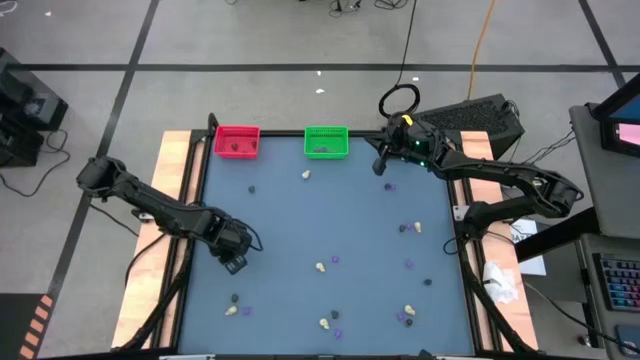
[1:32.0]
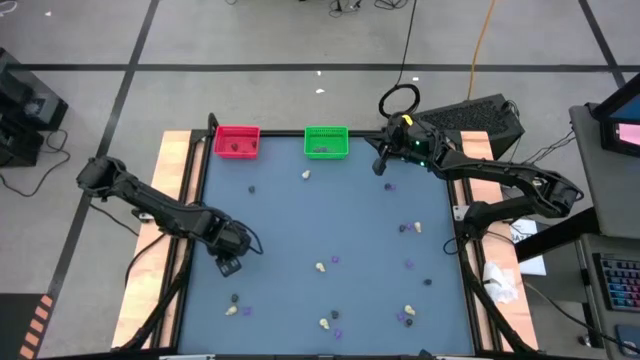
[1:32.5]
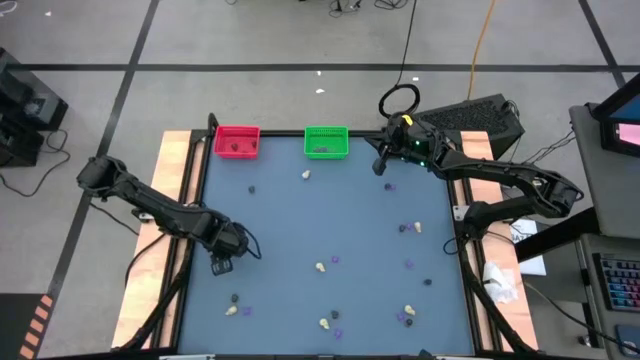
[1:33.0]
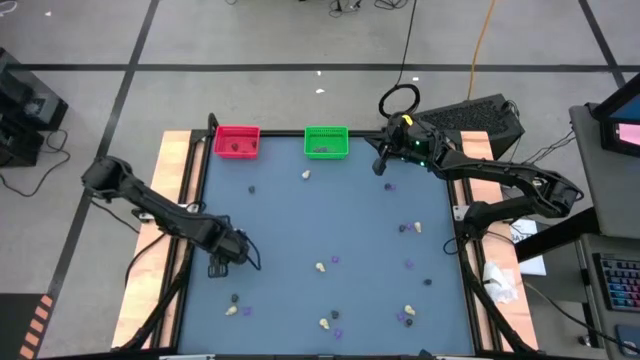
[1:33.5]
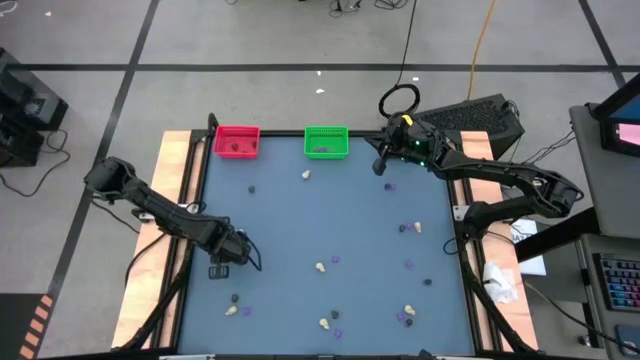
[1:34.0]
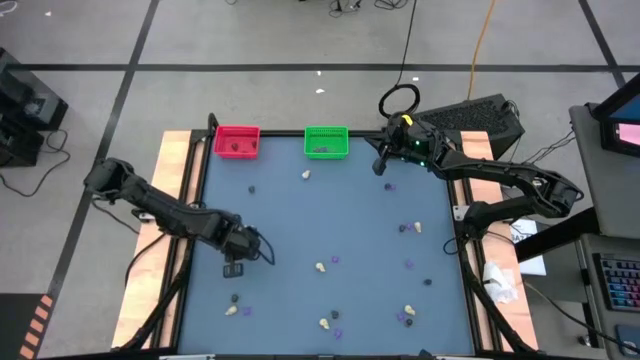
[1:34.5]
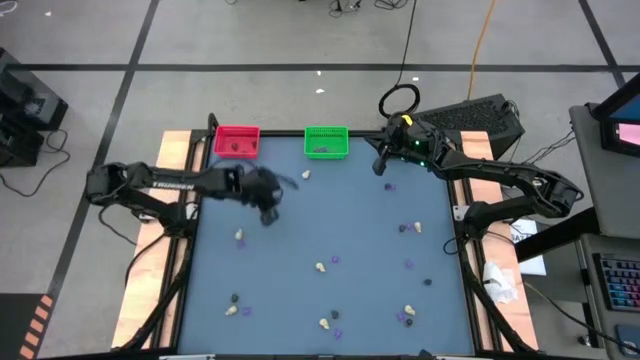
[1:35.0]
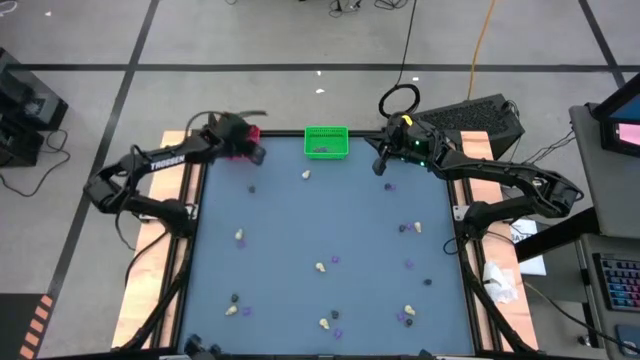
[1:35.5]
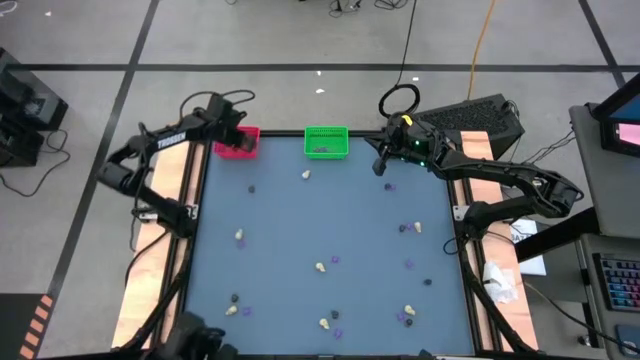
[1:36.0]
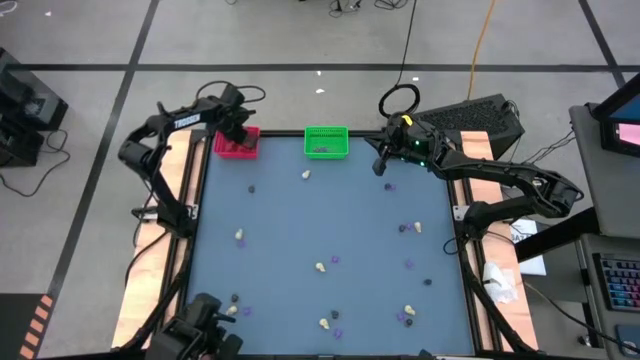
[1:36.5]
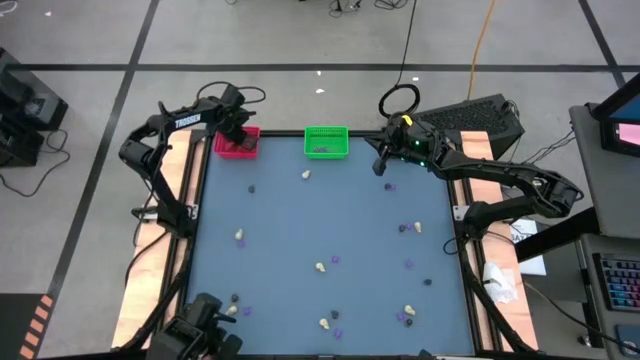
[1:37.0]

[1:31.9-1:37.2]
Task: Sort Halloween decoration
Put the black skull toy into the red bin

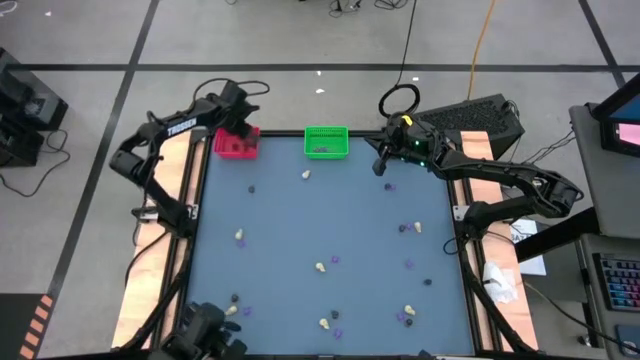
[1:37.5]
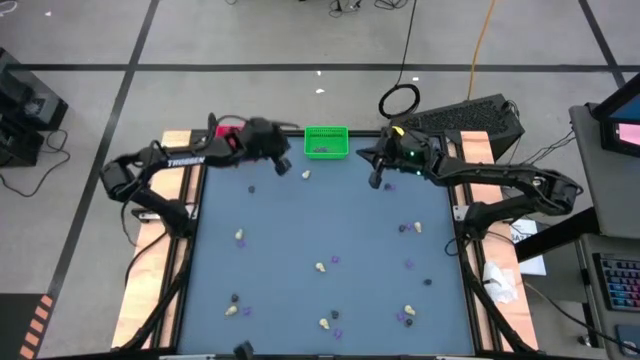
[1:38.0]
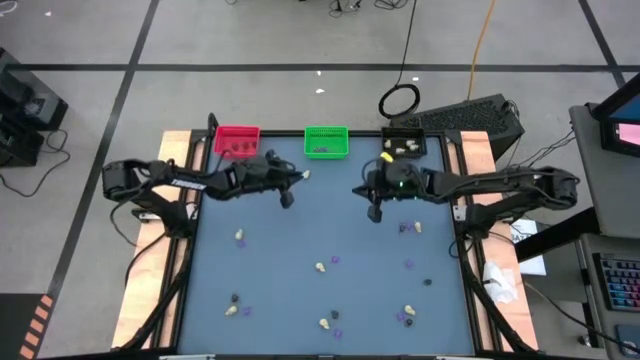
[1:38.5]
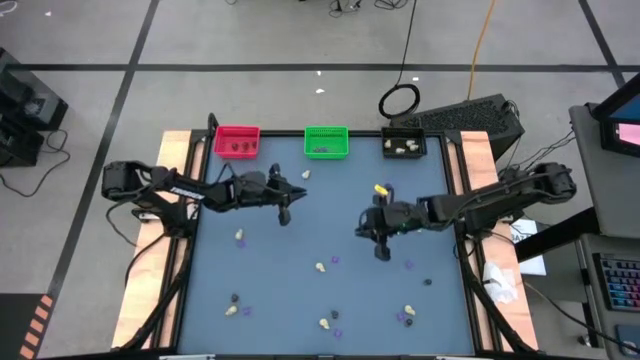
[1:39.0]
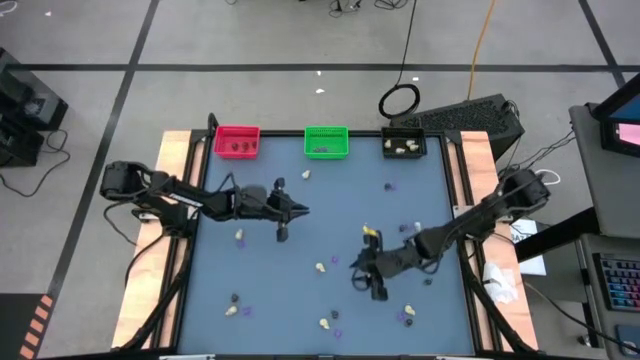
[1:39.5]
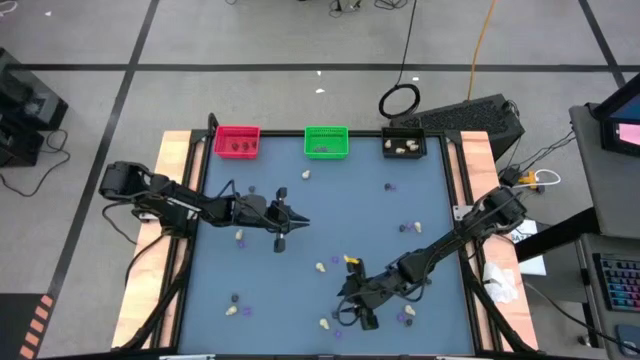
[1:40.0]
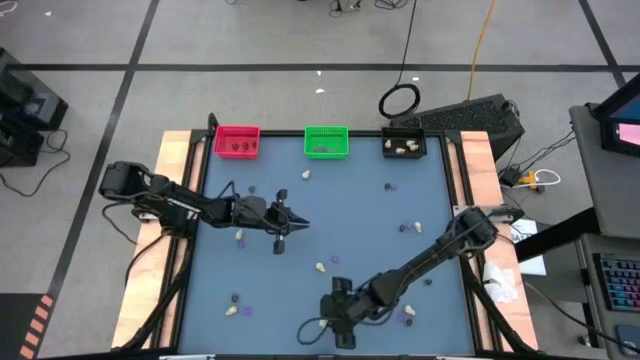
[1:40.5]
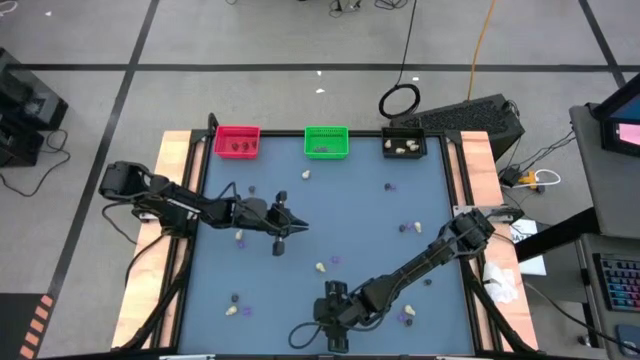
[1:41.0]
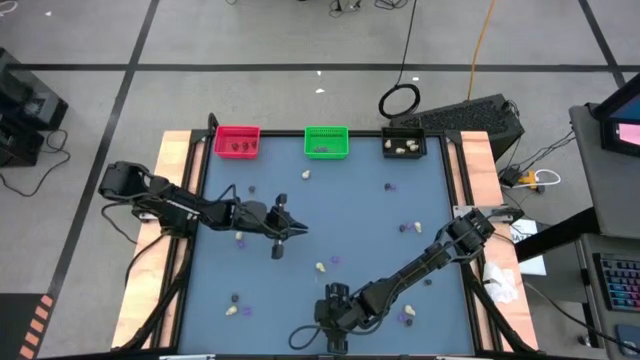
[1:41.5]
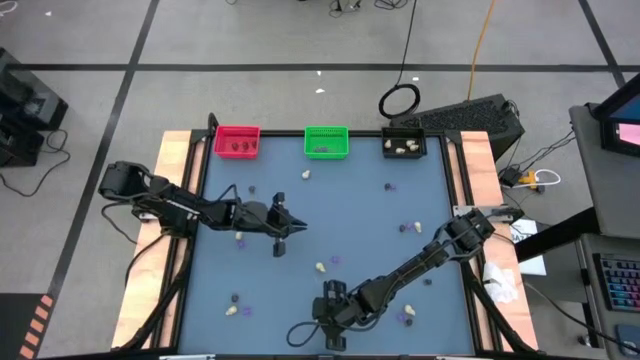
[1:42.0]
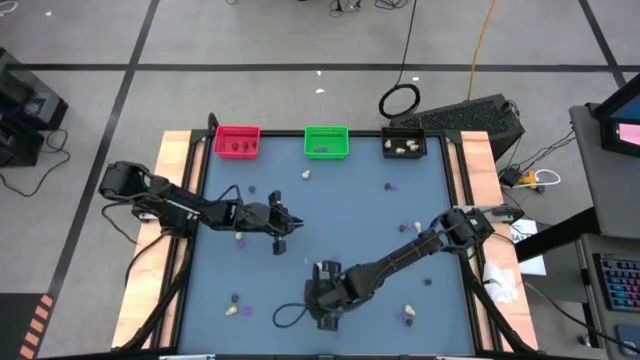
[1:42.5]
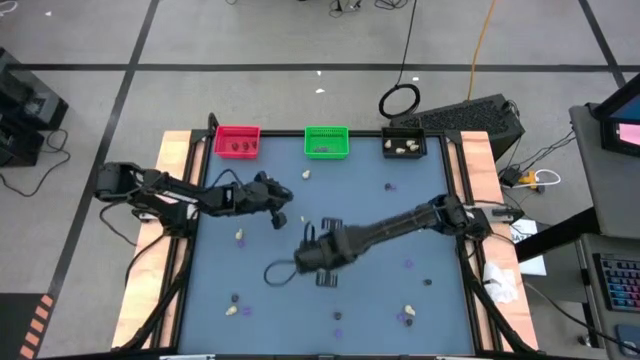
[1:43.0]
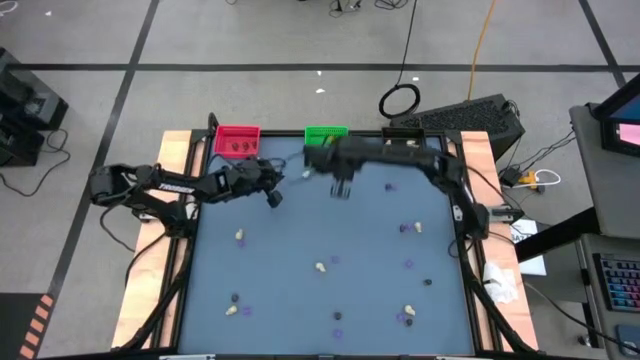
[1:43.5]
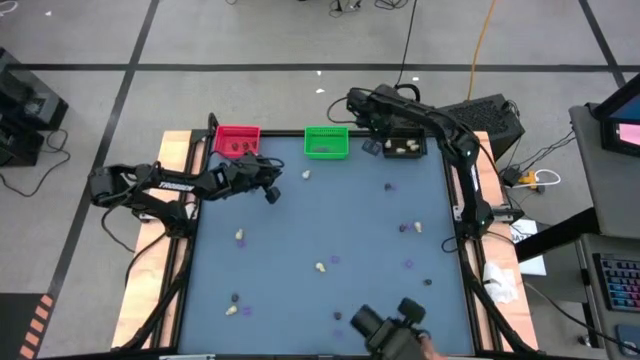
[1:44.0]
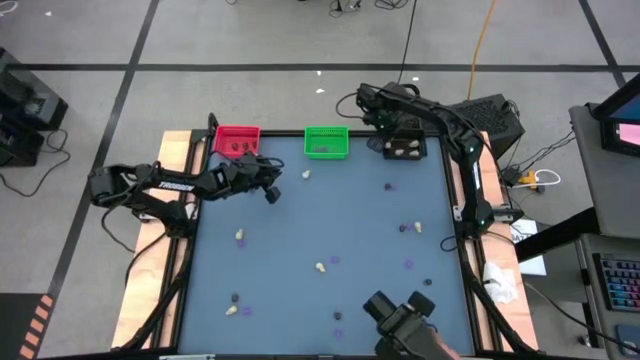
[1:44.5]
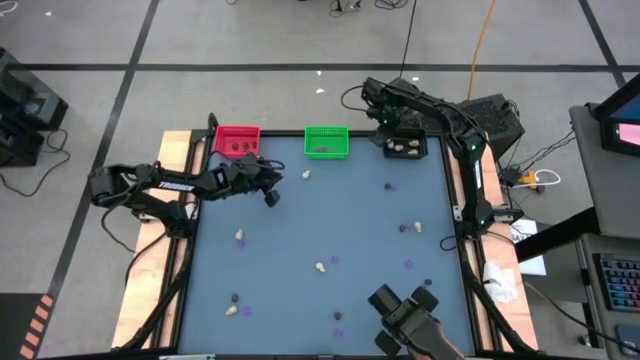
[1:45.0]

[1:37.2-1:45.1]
Put the white skull toy into the black bin

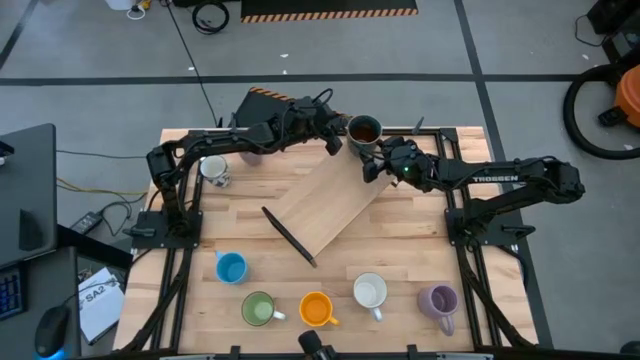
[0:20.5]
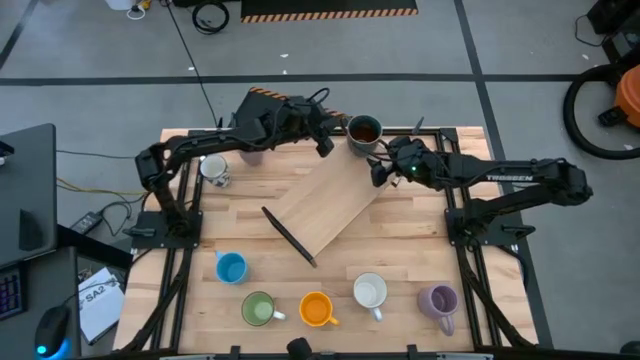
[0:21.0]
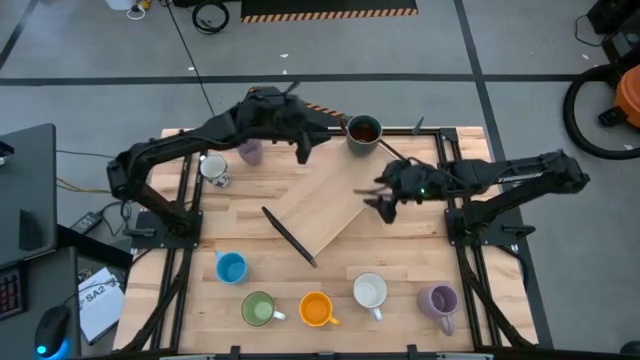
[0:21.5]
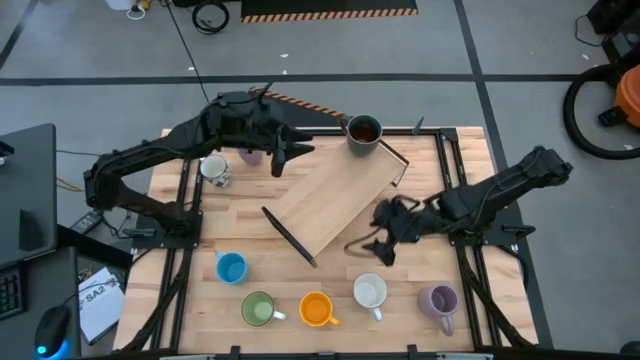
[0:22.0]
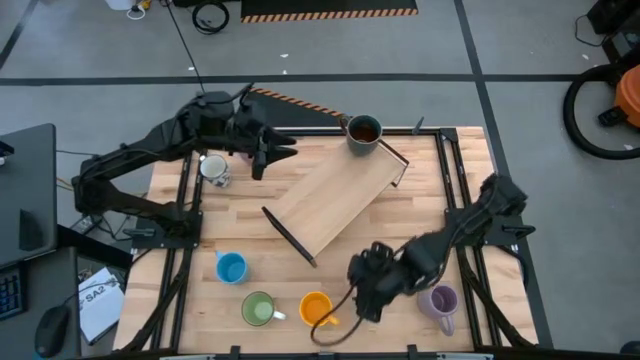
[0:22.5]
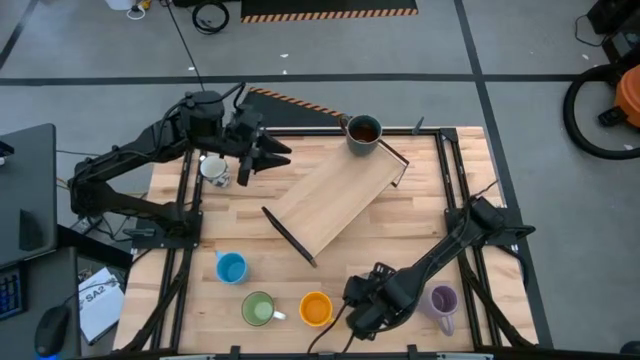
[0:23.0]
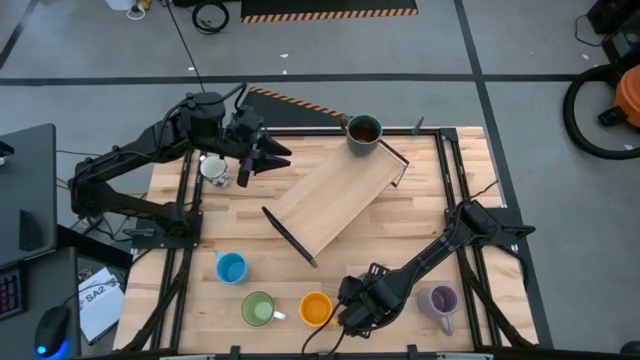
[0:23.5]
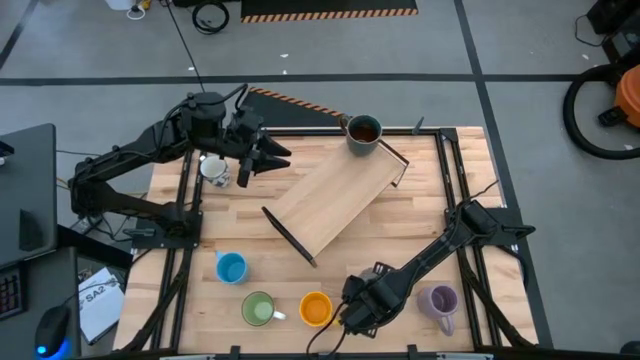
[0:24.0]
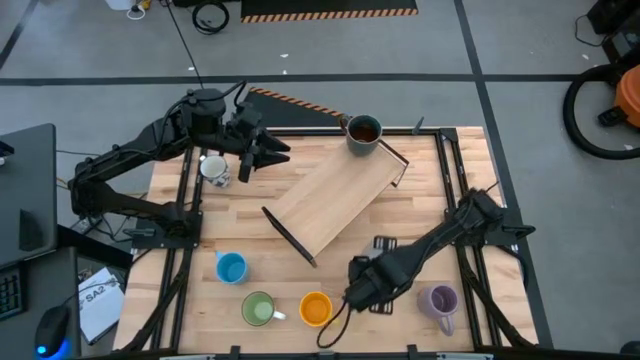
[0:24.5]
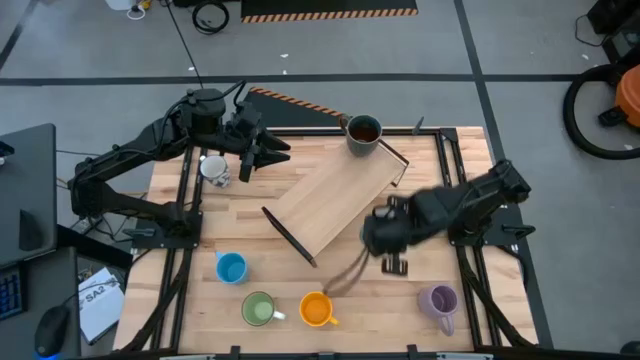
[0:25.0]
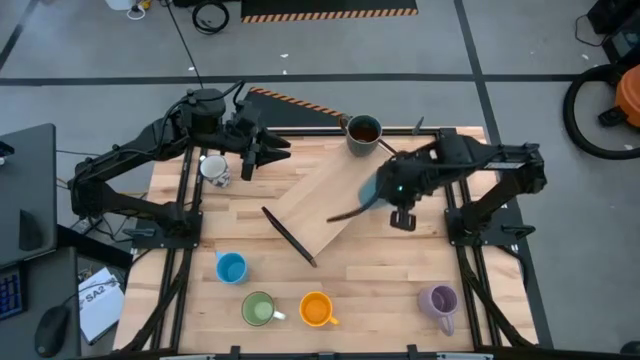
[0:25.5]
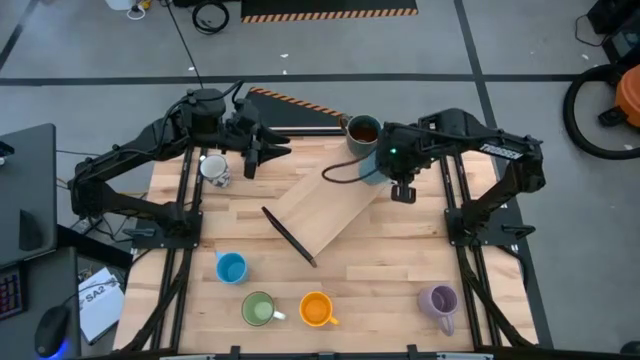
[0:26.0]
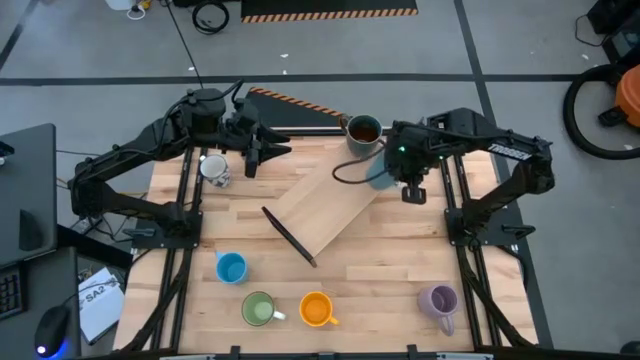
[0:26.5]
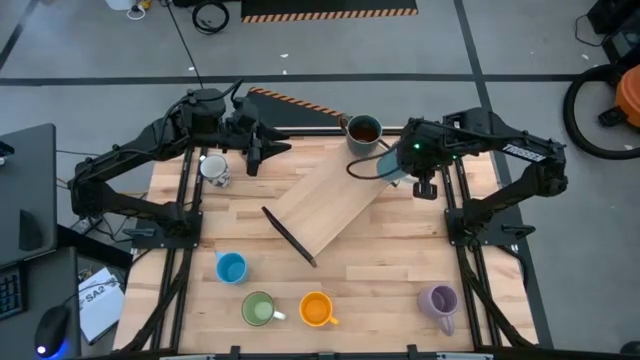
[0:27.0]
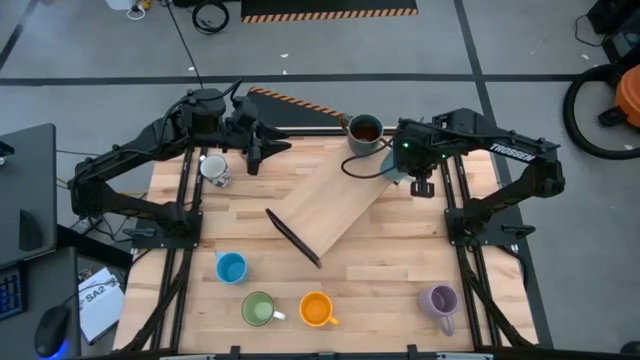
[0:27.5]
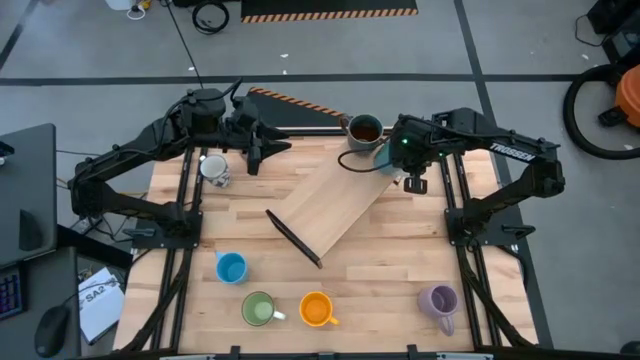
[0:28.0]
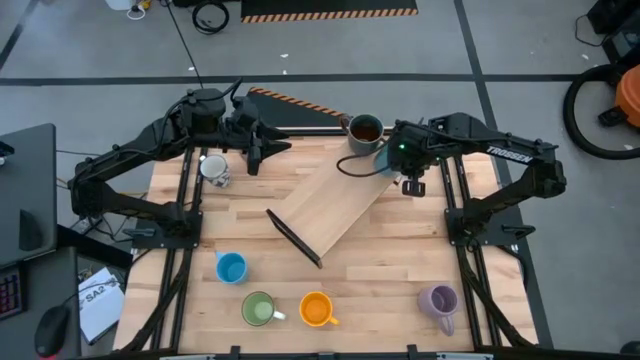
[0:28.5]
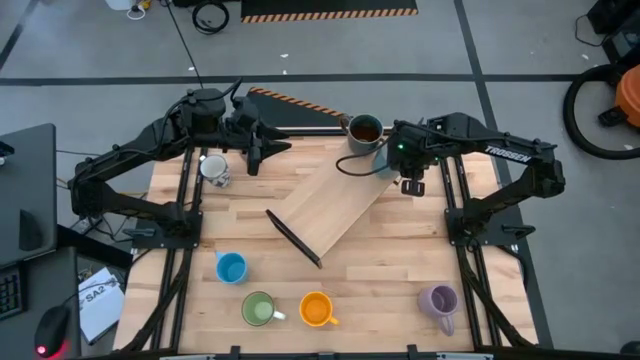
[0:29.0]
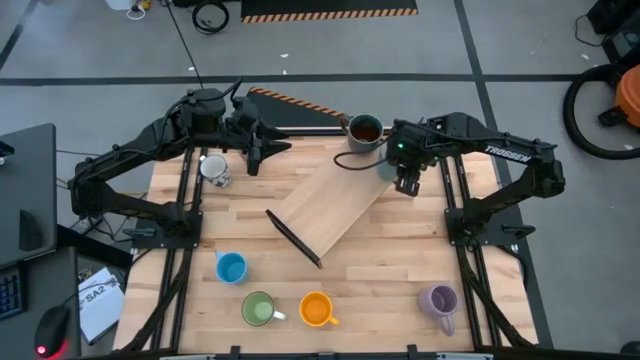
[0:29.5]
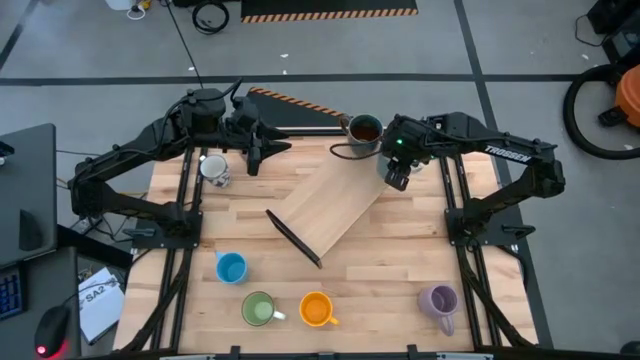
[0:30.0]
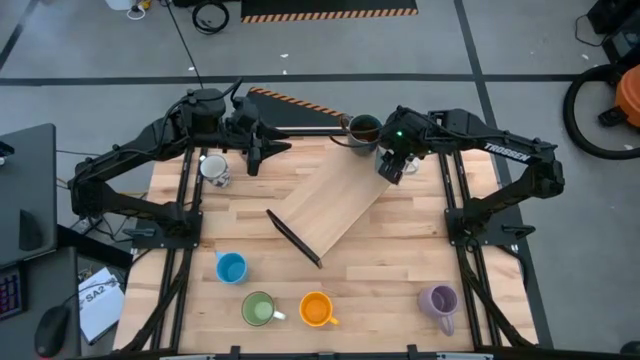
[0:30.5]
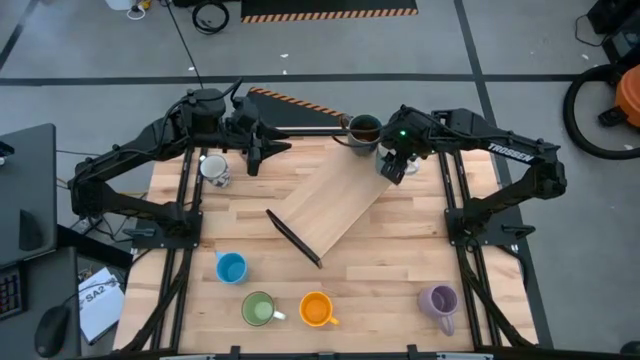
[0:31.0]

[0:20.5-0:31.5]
Task: Place coffee mugs
Put the light blue mug on the shelf
